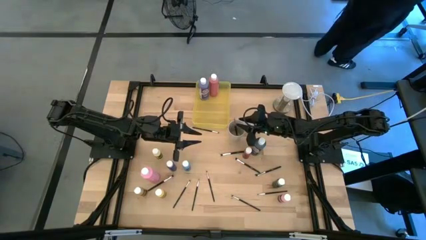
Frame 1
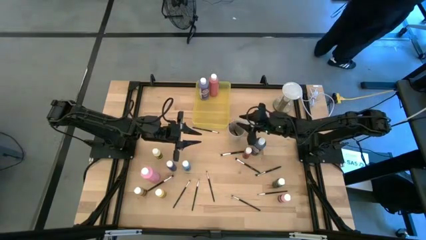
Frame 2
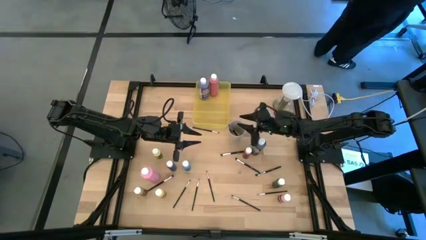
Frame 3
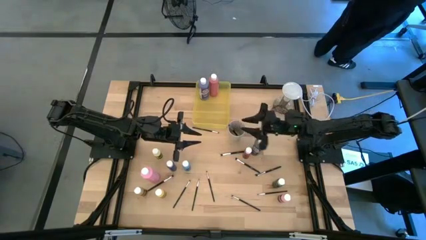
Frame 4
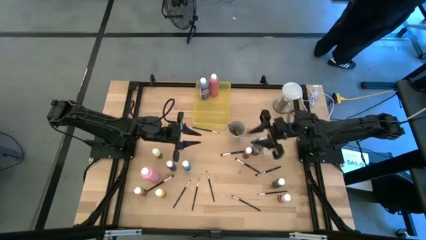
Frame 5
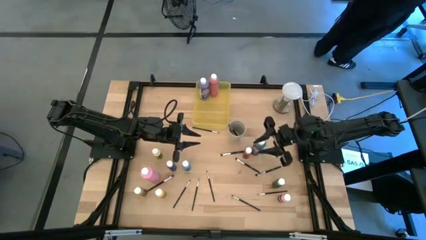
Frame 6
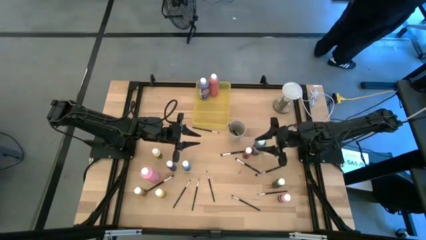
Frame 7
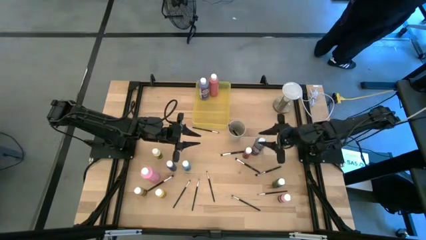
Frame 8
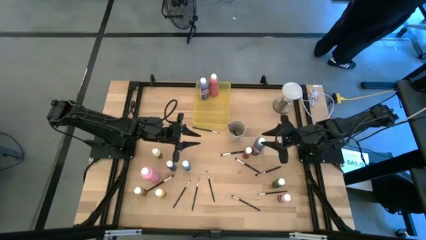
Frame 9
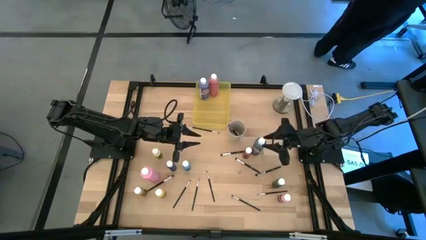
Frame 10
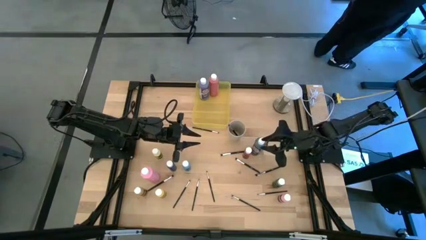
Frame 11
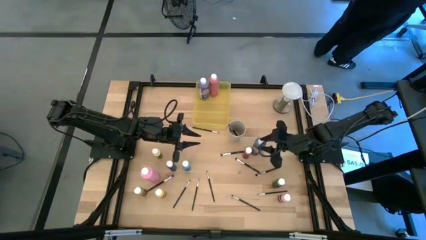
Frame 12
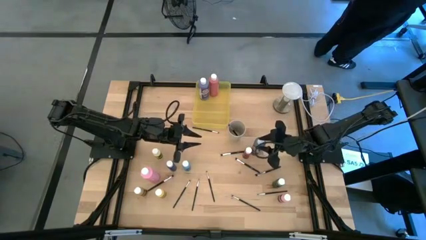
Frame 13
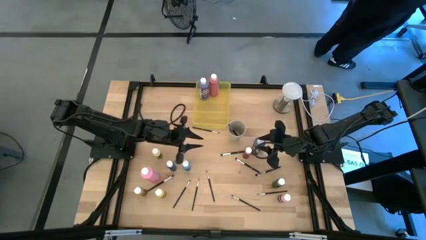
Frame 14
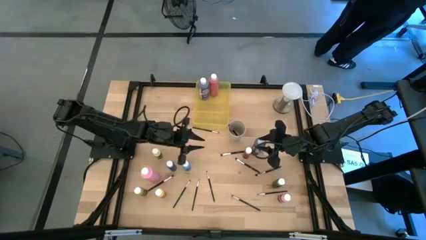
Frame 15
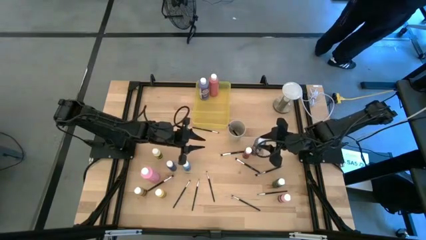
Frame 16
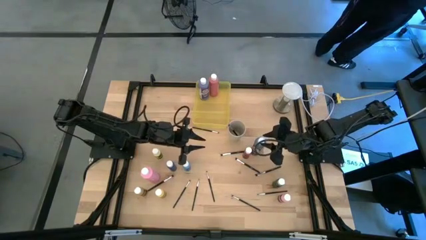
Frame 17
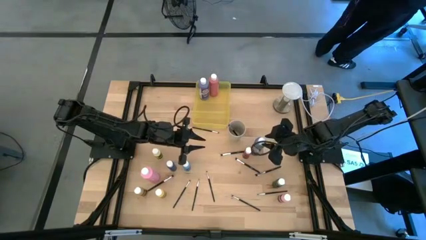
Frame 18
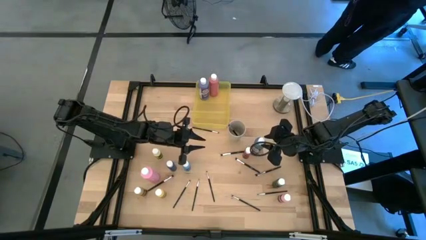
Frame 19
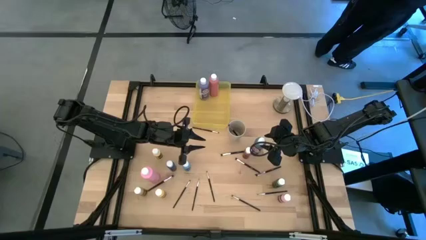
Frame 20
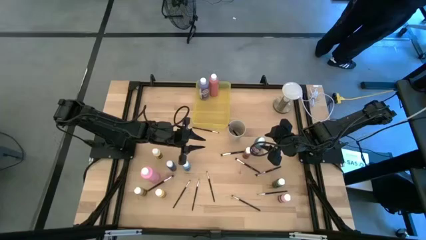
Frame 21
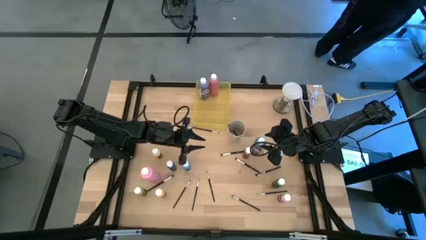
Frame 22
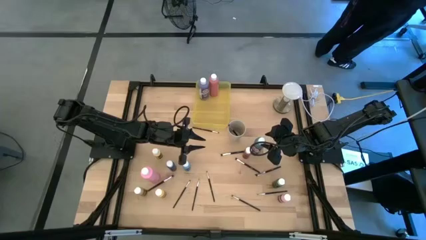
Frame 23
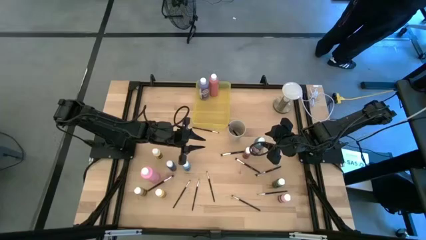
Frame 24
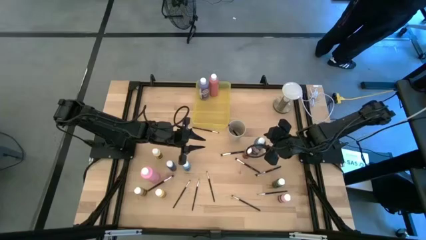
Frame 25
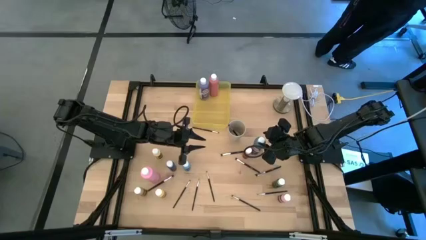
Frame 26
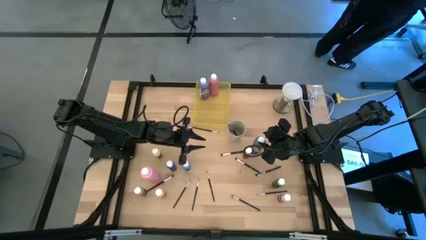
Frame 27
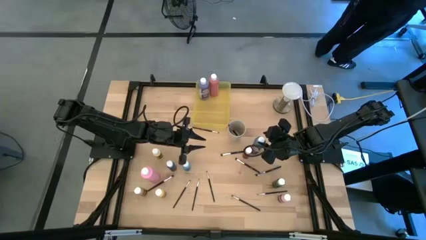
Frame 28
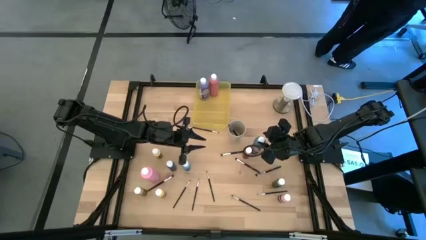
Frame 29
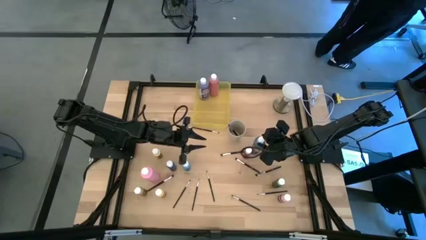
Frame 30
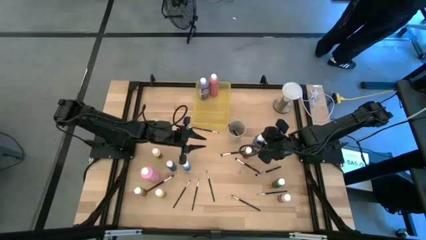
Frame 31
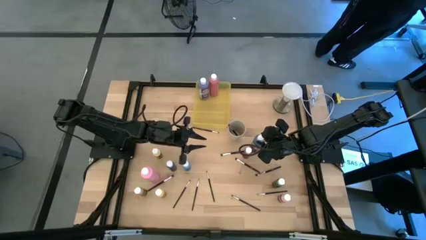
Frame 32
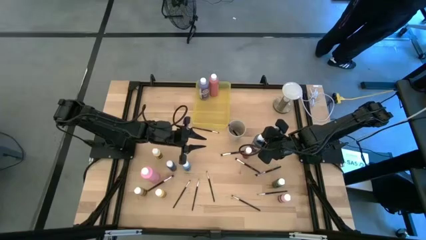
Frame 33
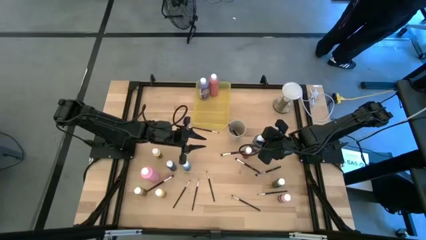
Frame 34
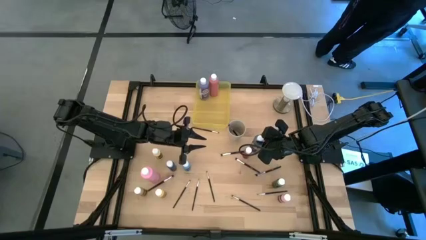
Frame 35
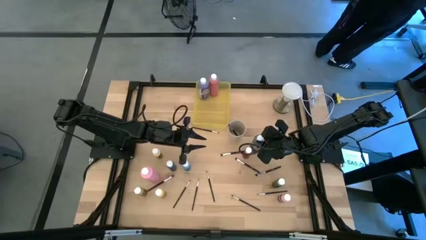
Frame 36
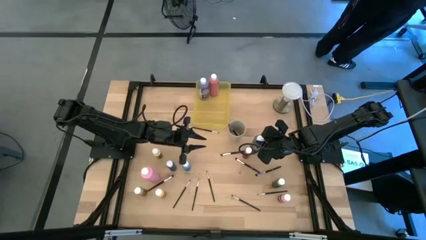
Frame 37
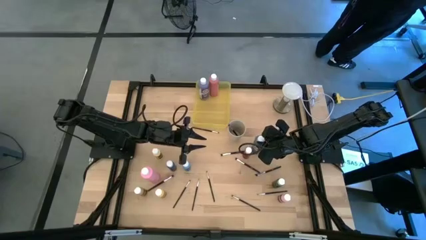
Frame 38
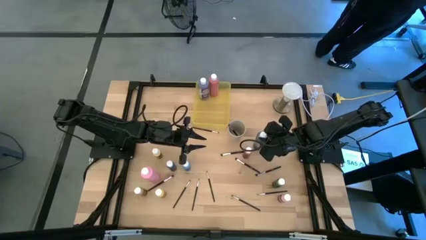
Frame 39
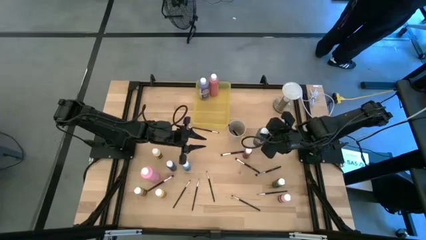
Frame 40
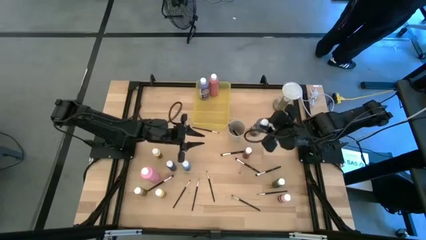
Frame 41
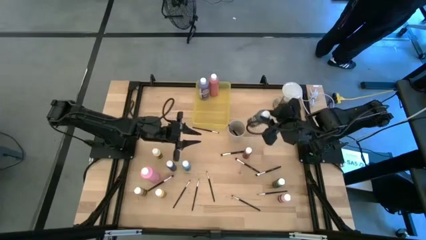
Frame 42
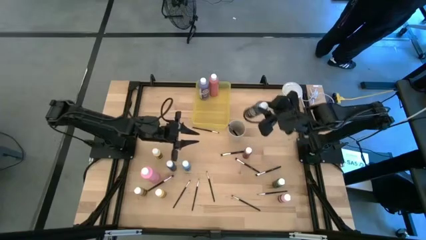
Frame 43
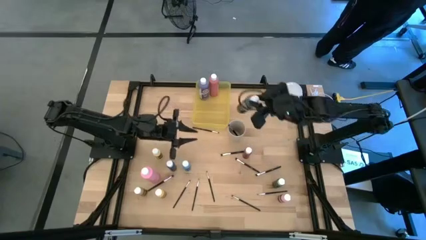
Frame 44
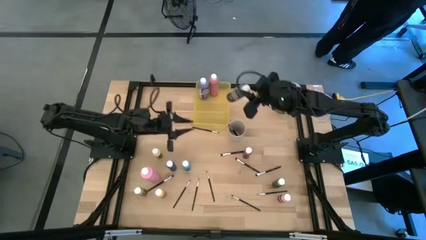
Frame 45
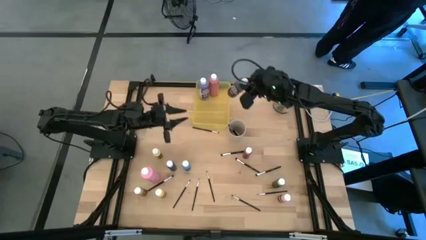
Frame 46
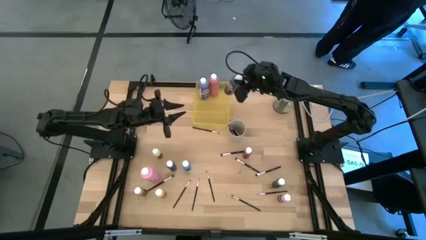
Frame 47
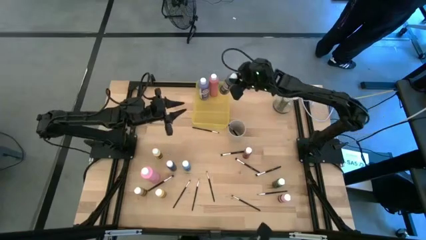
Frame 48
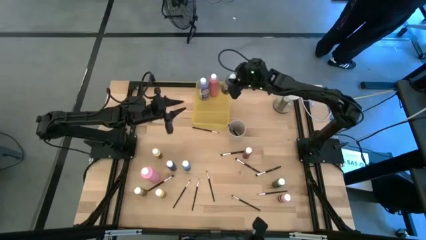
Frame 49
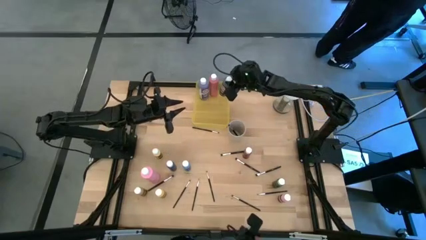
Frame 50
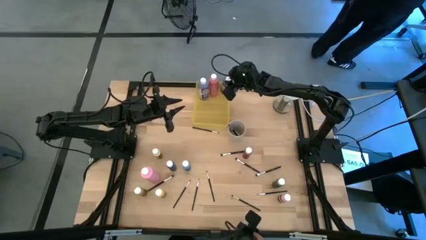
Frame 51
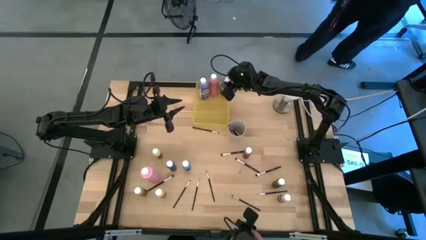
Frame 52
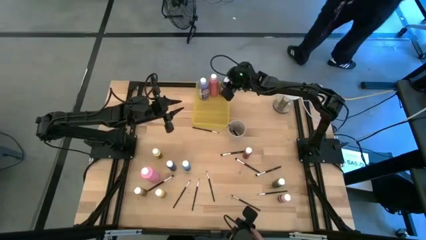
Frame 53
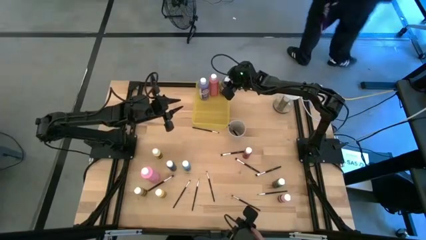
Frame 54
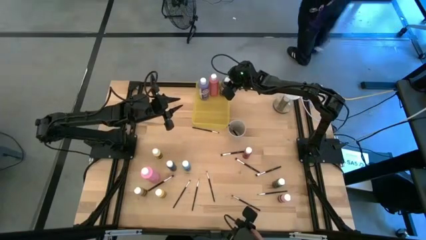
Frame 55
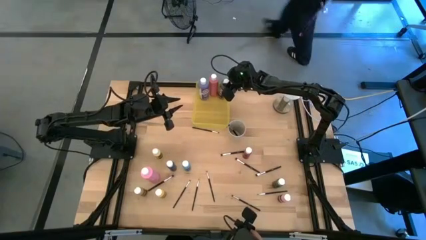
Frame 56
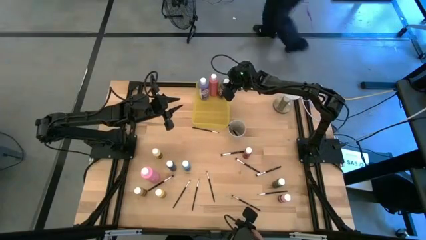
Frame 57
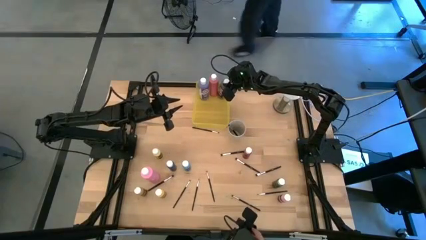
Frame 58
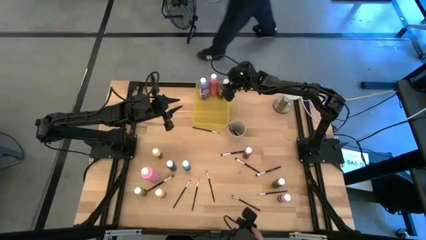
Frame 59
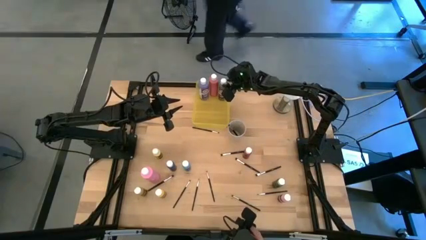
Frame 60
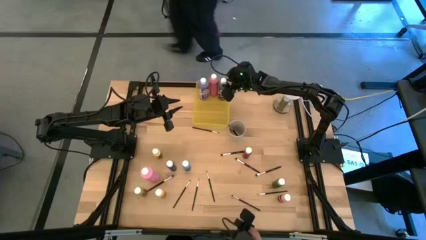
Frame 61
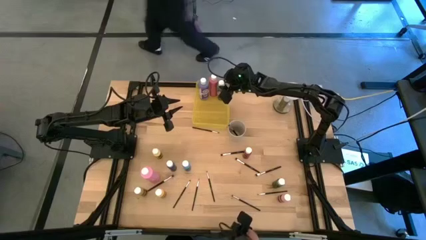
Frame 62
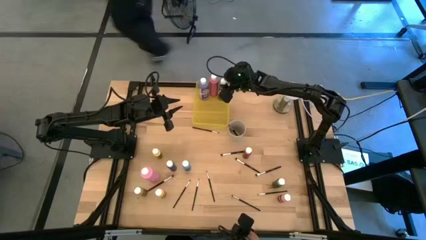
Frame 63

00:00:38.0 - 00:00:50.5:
Task: Pick & Place Paint Supplies
Put the large black paint bottle into the yellow bin

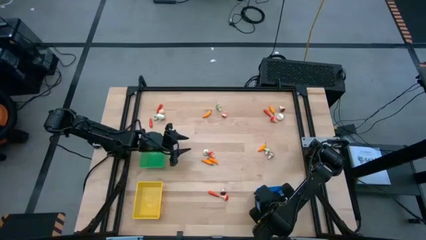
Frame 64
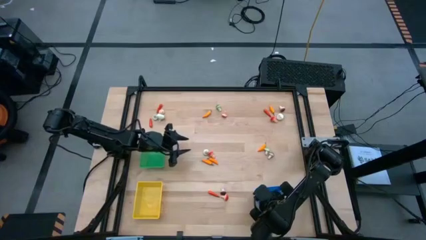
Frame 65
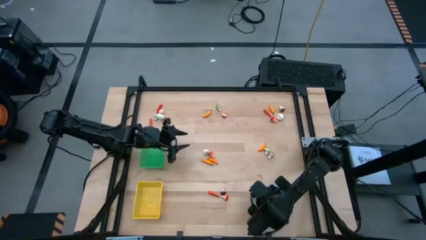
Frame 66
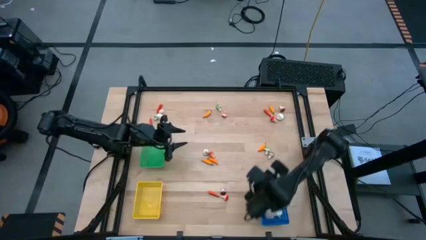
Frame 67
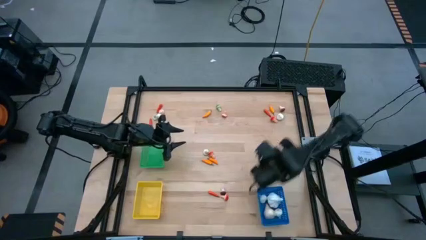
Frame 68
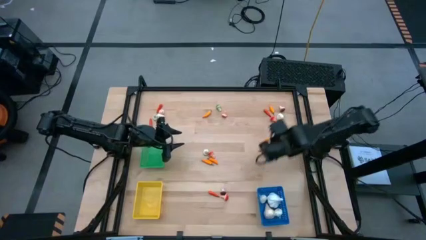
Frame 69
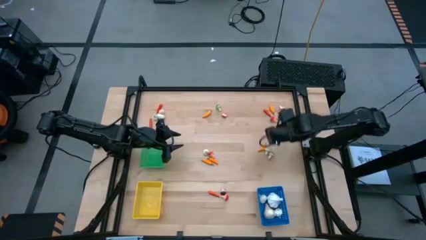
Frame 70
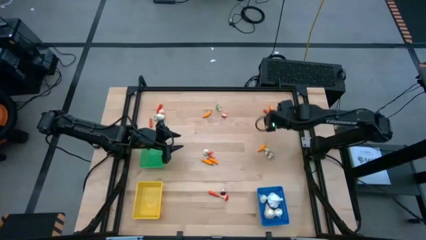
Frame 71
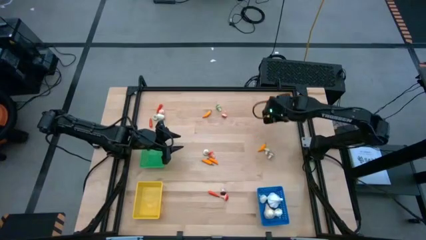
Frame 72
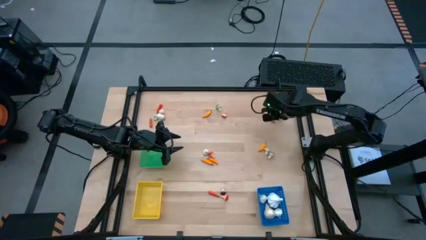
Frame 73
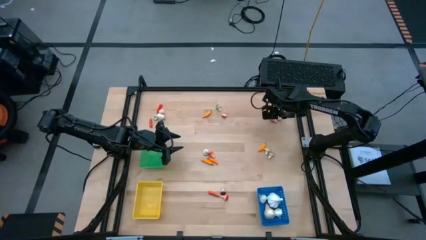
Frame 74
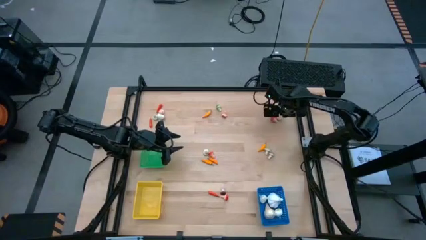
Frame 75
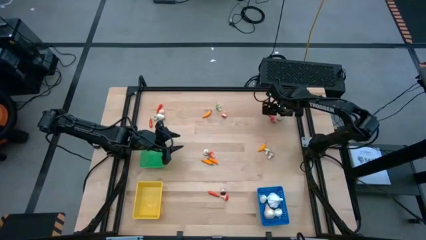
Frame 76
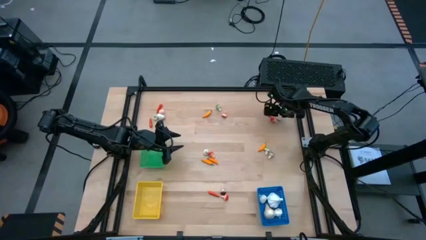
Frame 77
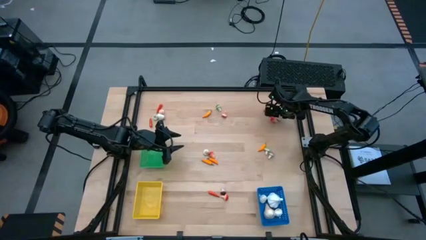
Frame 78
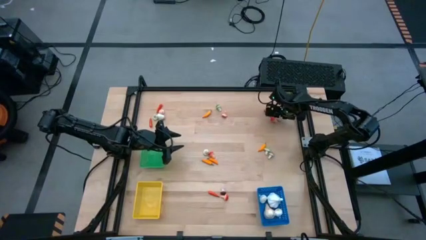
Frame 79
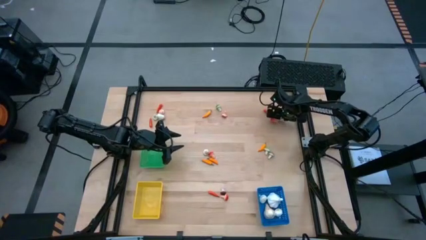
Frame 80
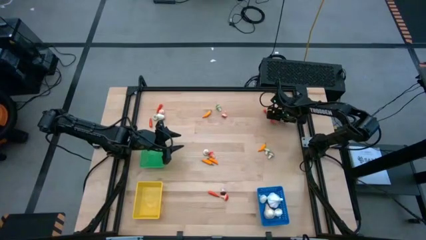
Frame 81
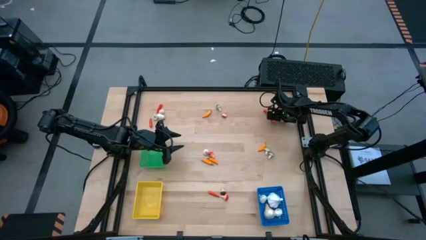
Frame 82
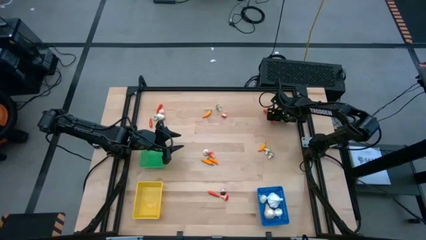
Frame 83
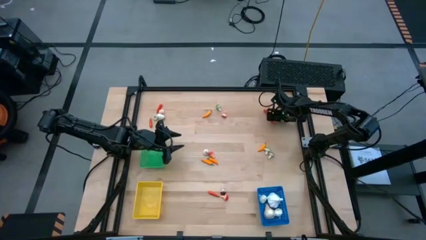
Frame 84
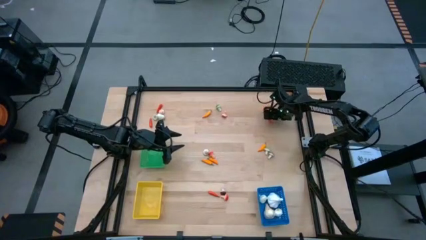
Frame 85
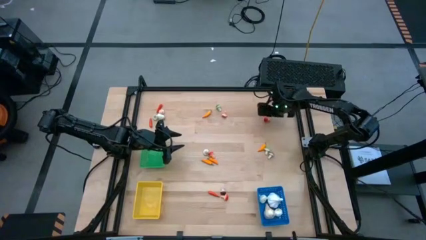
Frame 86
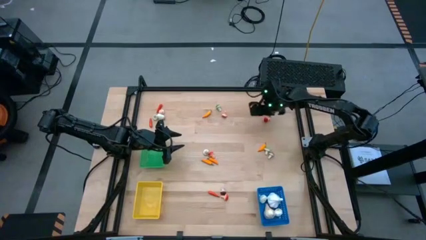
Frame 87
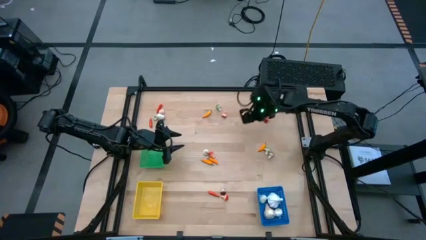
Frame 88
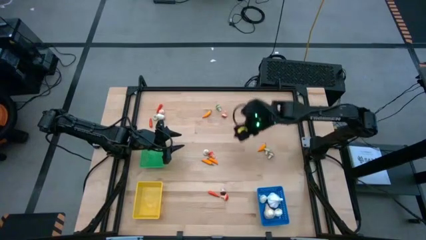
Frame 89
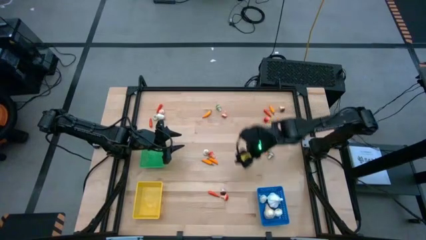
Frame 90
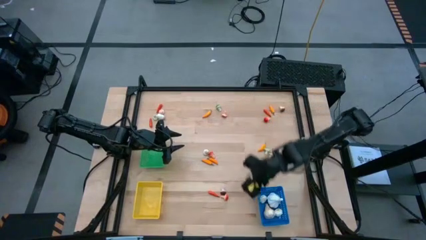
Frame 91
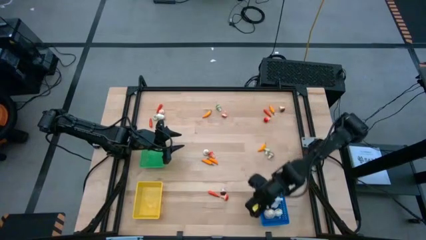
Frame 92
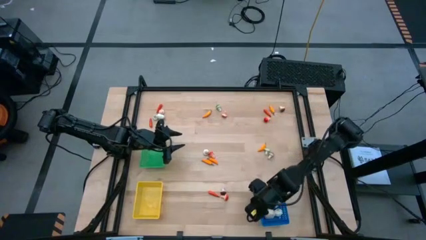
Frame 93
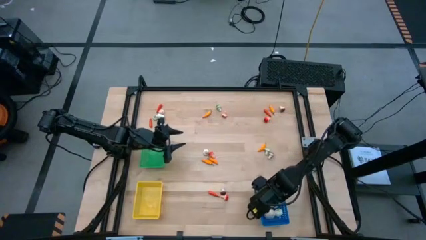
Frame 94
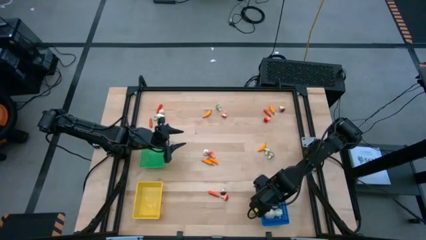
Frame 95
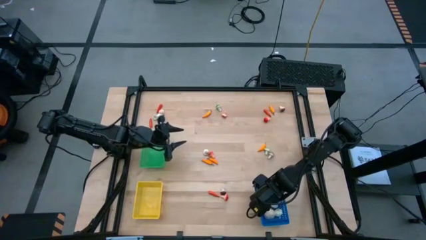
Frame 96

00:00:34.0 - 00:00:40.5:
Task: Sort produce into baskets
Put the garlic into the blue bin
